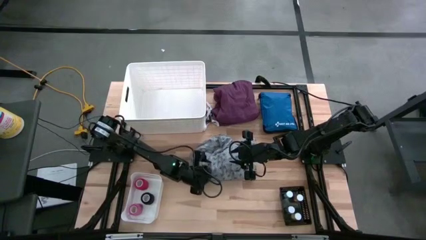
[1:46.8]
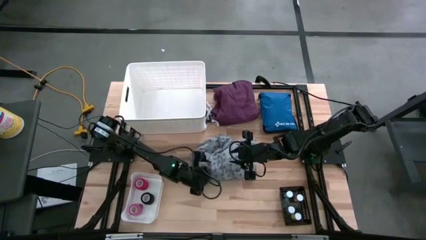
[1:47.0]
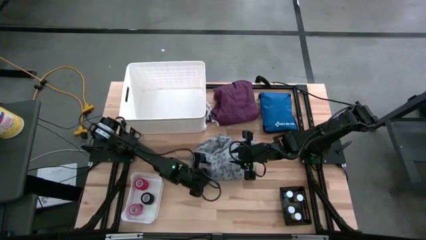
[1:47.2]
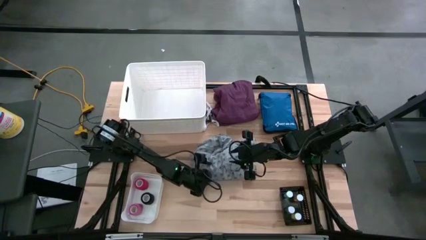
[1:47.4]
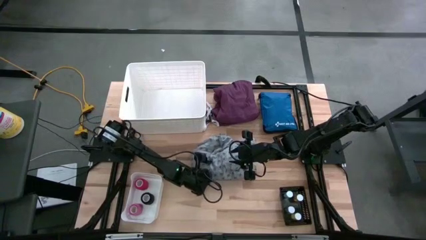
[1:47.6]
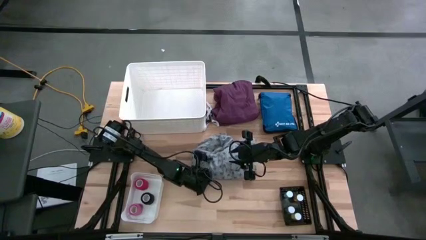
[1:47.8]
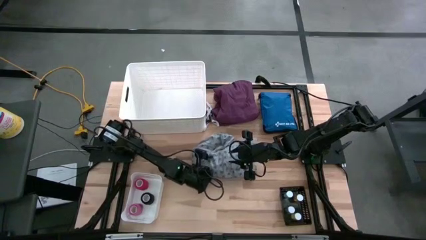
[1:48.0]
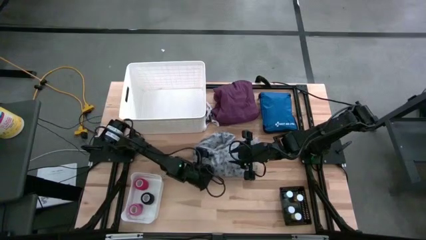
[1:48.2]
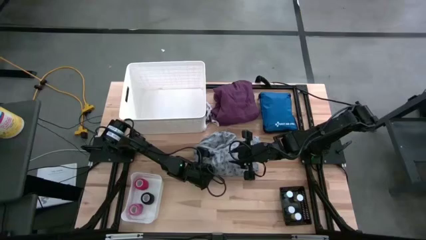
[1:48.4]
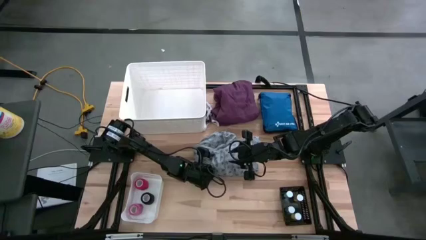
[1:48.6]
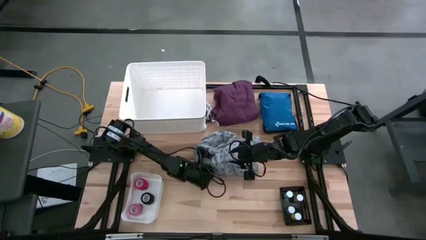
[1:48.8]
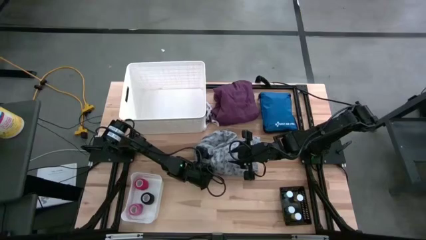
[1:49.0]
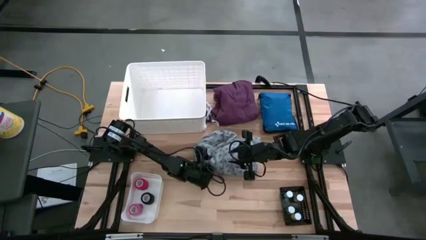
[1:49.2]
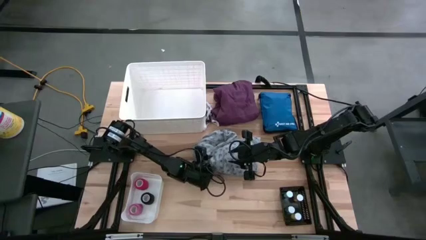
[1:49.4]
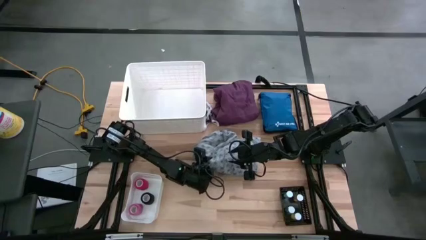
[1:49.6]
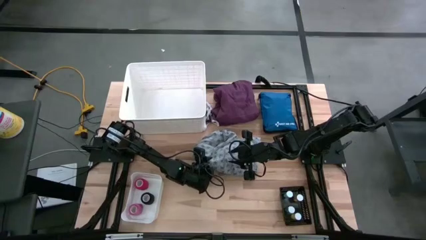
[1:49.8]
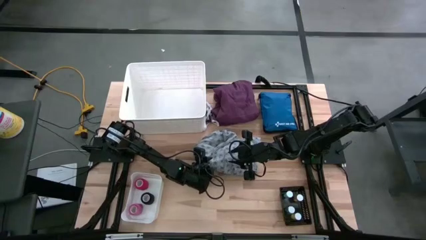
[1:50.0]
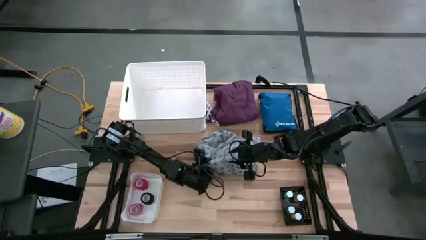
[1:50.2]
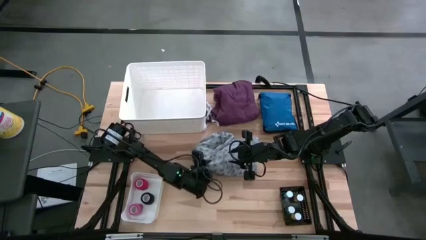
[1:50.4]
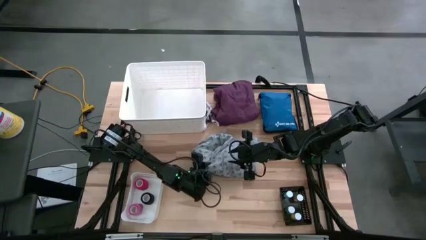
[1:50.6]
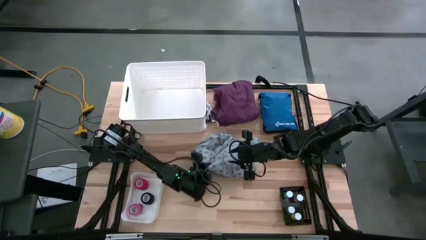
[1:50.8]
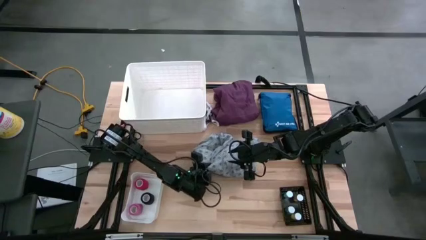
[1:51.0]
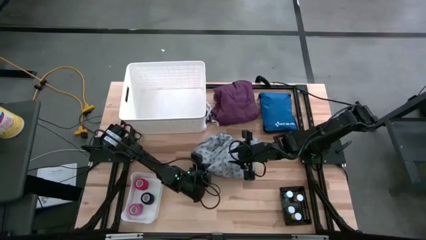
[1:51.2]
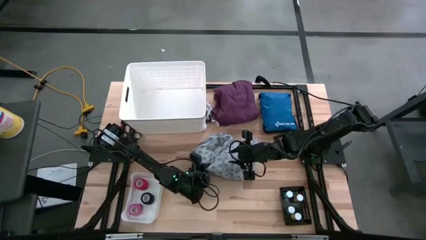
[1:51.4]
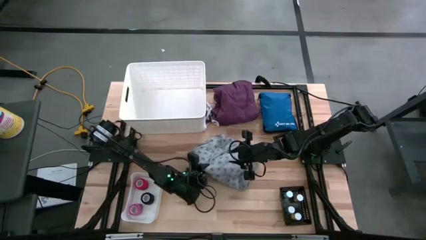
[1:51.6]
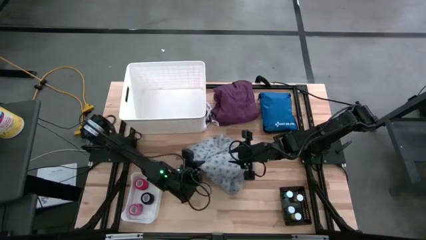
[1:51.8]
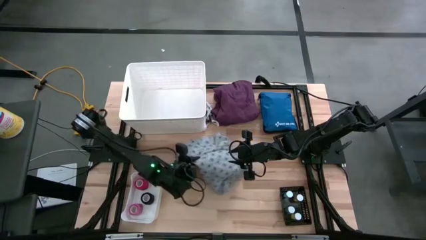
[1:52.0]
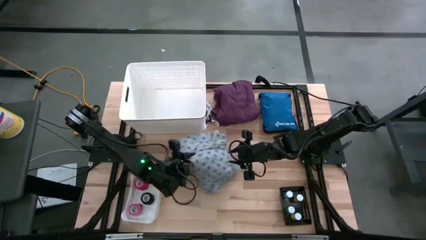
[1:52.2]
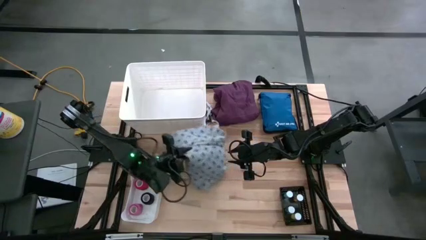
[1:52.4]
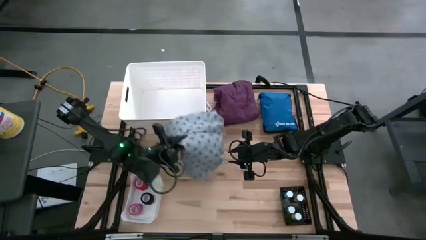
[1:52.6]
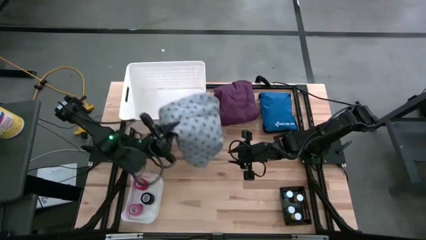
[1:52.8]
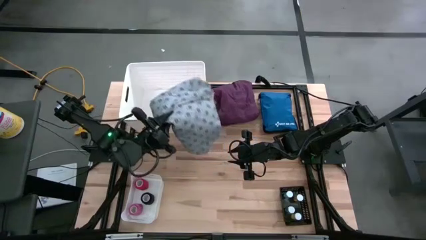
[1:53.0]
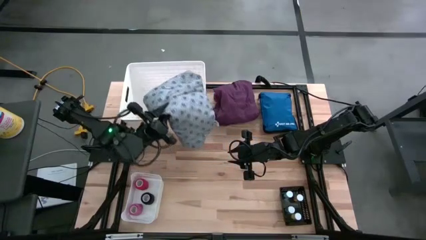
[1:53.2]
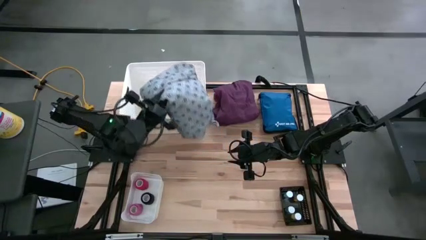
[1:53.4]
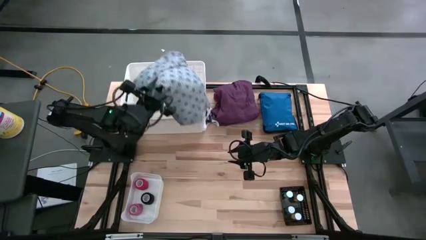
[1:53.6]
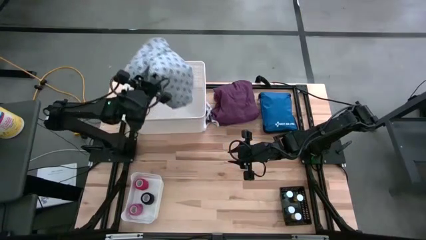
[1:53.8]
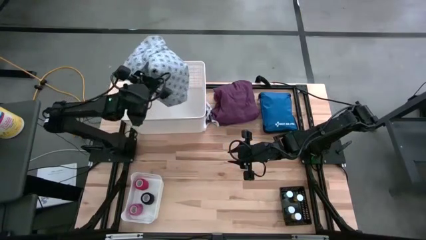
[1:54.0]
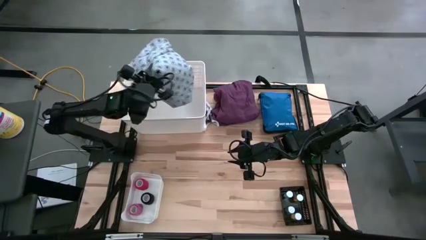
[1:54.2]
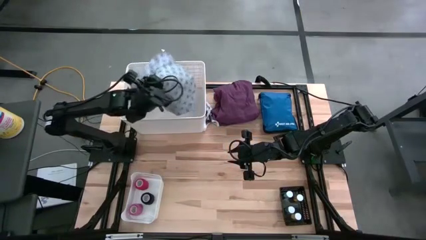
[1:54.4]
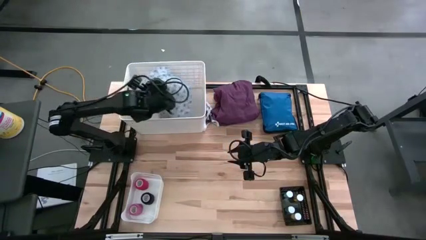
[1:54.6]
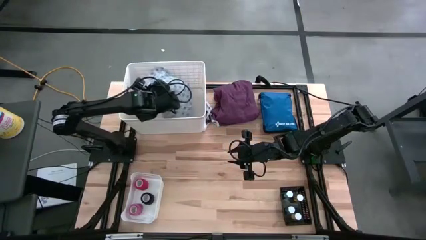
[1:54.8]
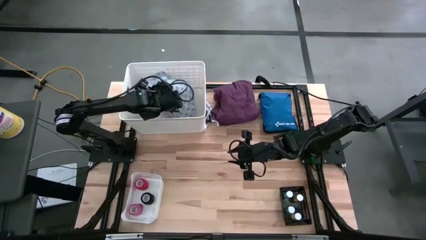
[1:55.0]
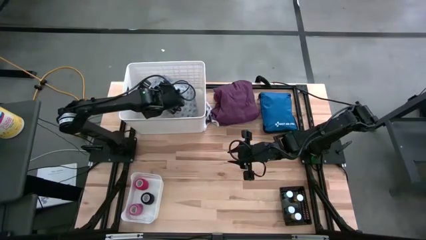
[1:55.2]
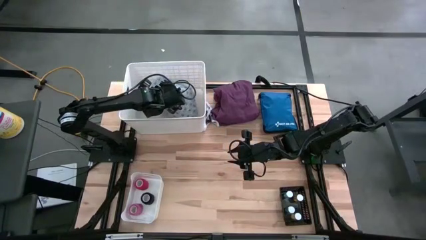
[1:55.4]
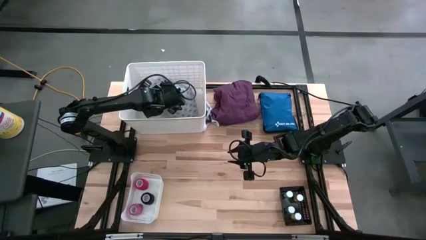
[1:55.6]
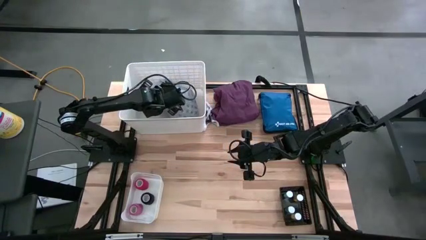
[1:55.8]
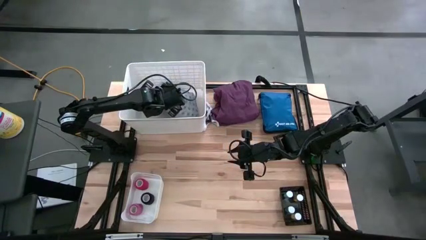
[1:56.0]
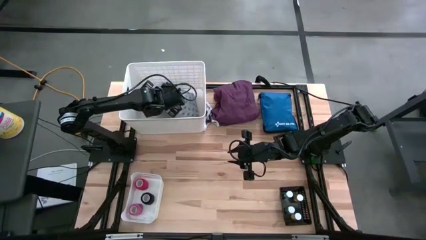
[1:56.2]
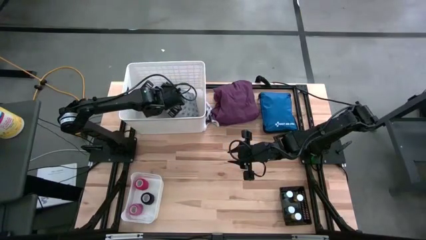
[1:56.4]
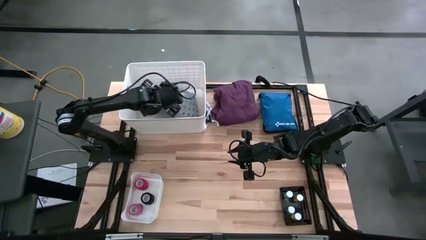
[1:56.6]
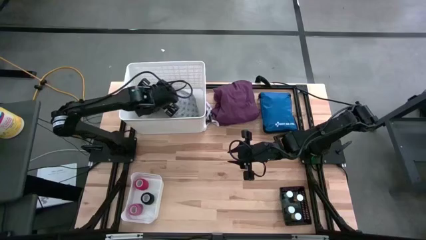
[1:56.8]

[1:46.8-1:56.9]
Task: Pick & place medical supplies in basket/bin
Put the gray patterned patient gown into the top white bin
